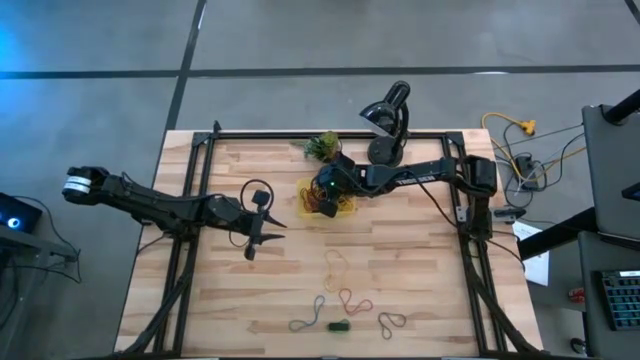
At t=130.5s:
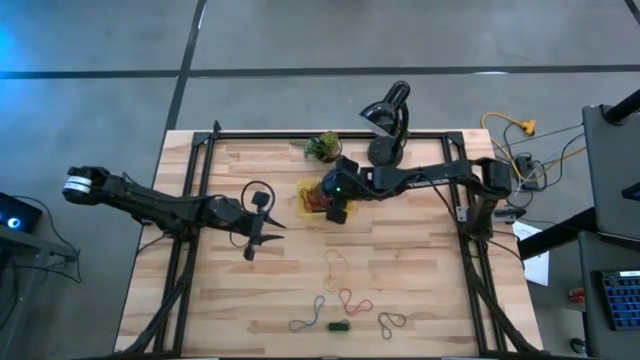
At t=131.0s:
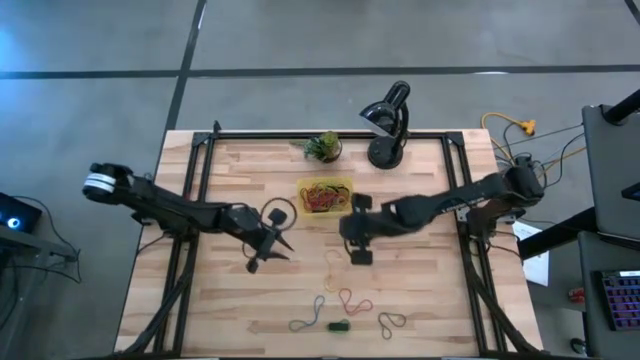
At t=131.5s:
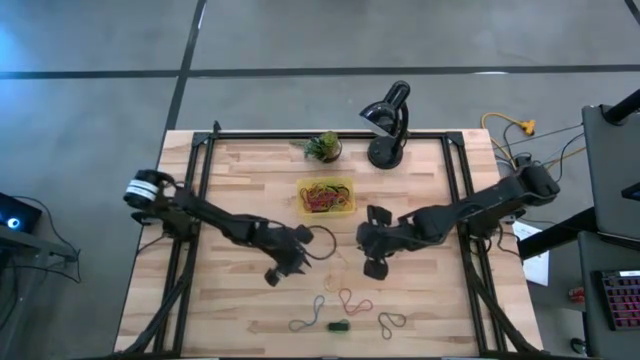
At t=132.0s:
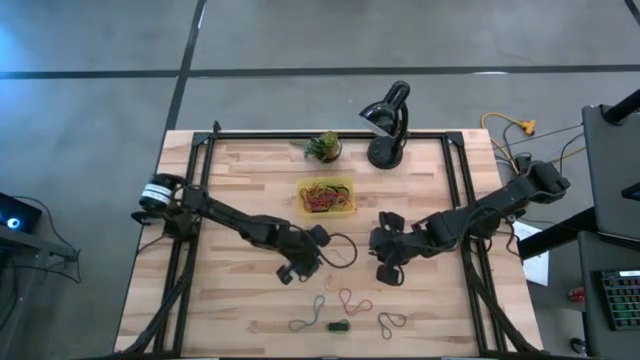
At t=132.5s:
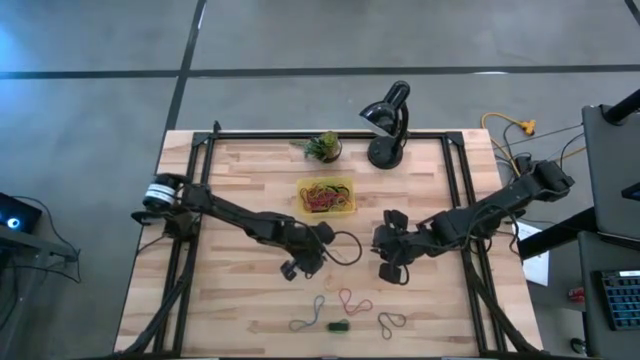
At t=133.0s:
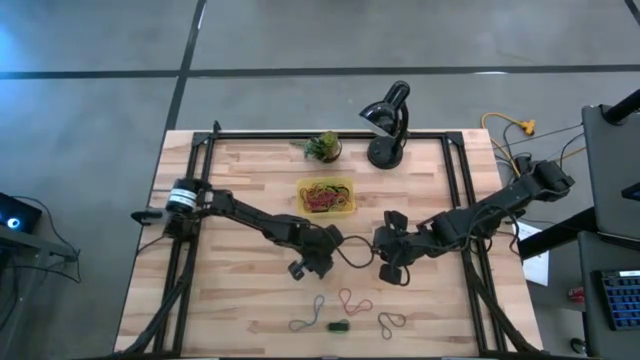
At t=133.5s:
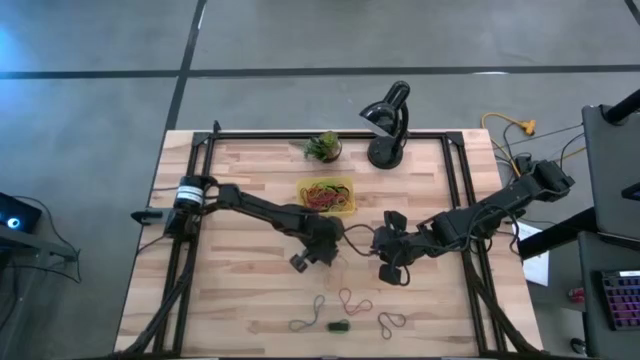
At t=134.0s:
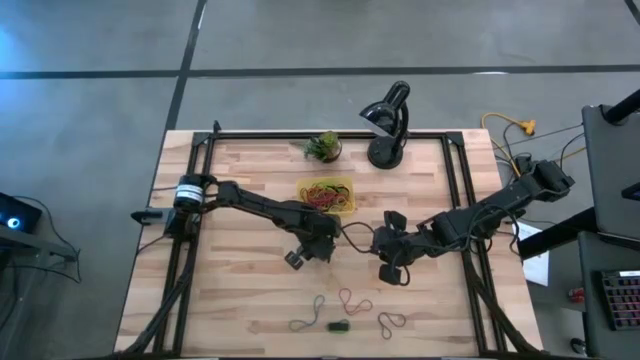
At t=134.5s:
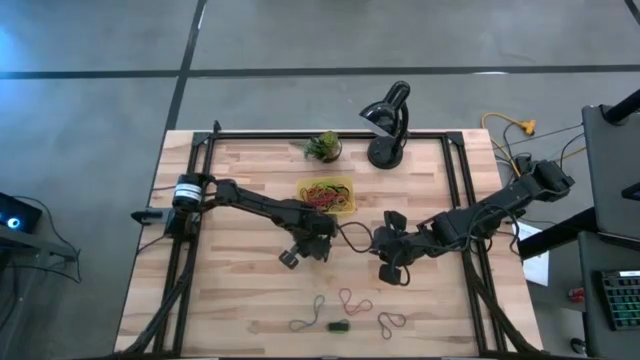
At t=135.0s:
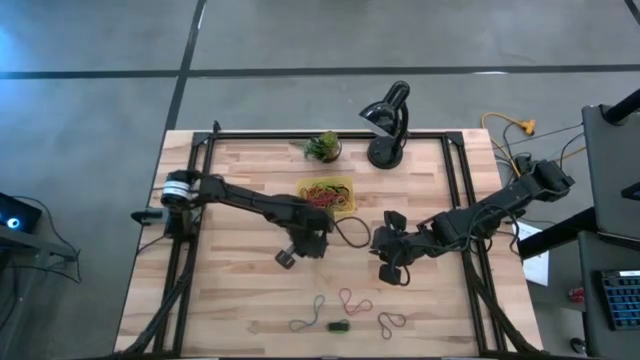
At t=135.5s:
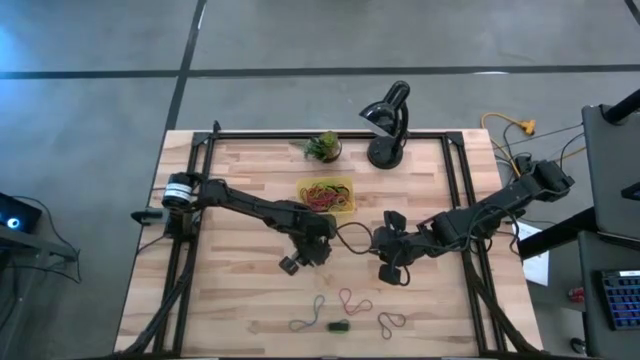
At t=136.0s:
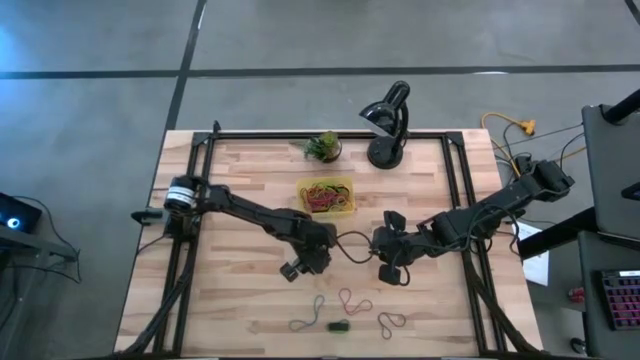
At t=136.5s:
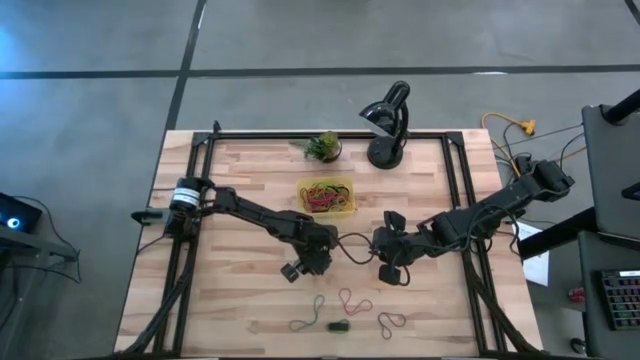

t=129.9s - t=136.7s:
Task: Pick and place rubber bands into bin
Put the yellow rubber band in the yellow bin

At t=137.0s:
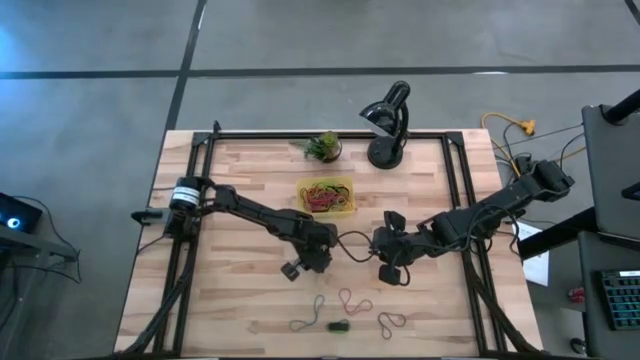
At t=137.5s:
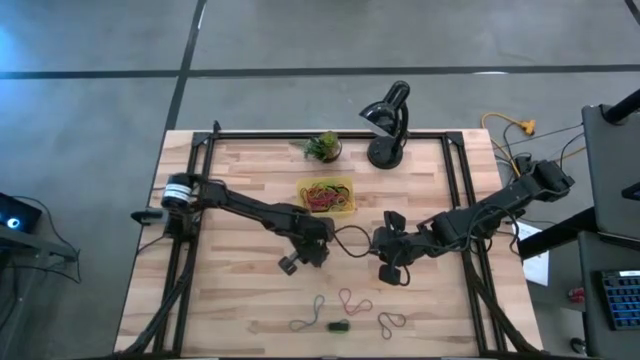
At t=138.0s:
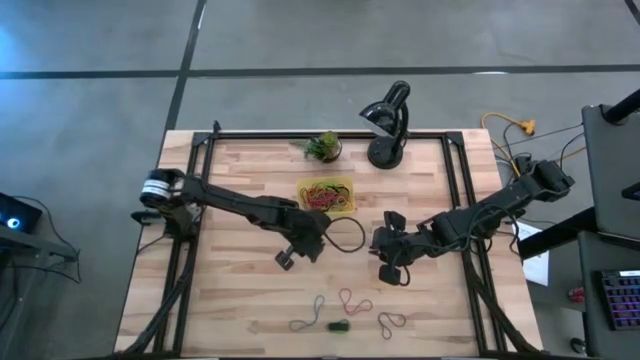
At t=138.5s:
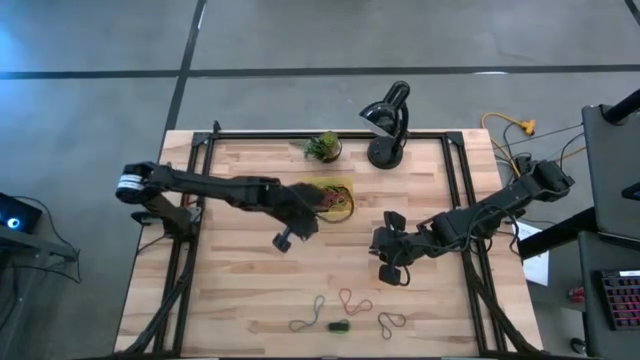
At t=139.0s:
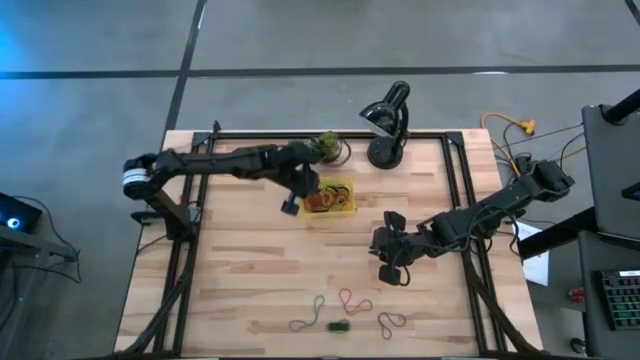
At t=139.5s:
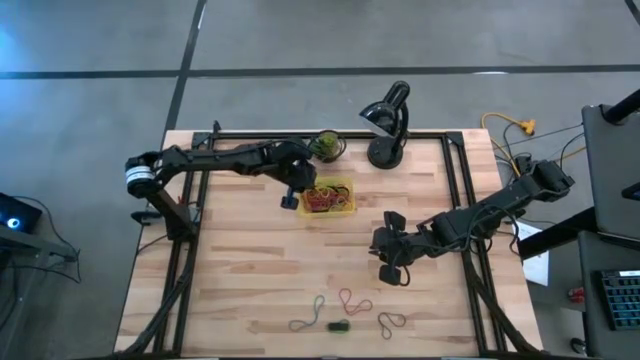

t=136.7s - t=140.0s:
Put the yellow rubber band in the yellow bin

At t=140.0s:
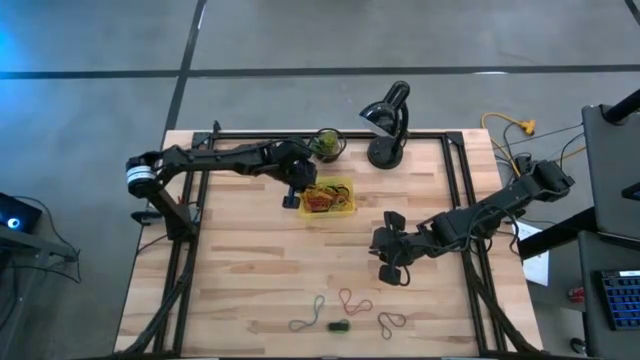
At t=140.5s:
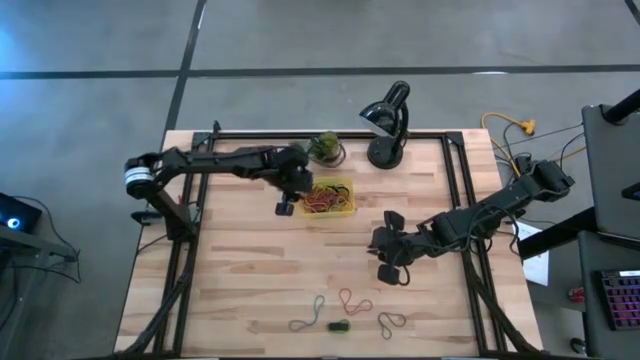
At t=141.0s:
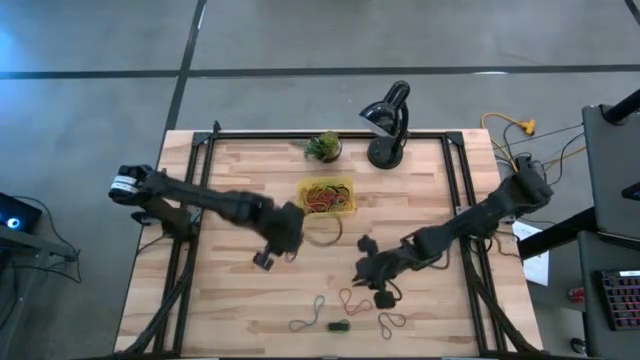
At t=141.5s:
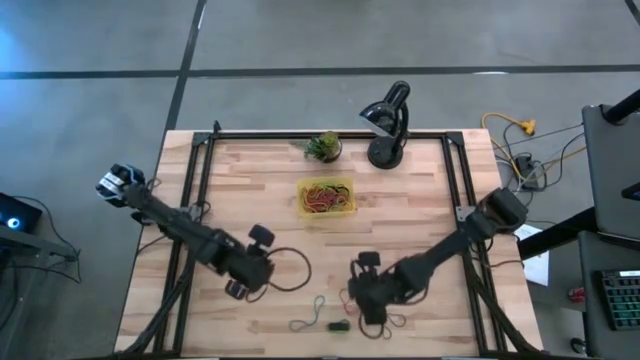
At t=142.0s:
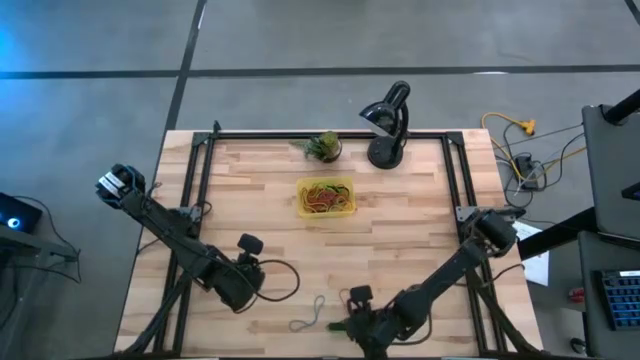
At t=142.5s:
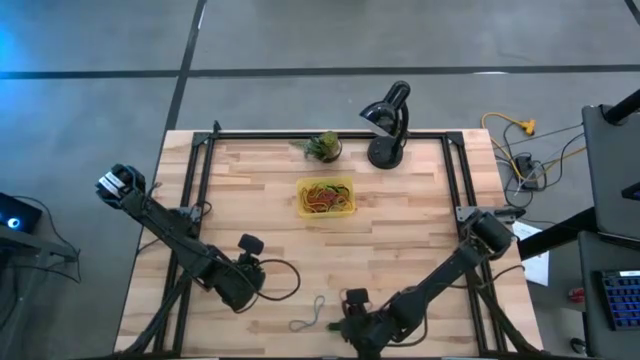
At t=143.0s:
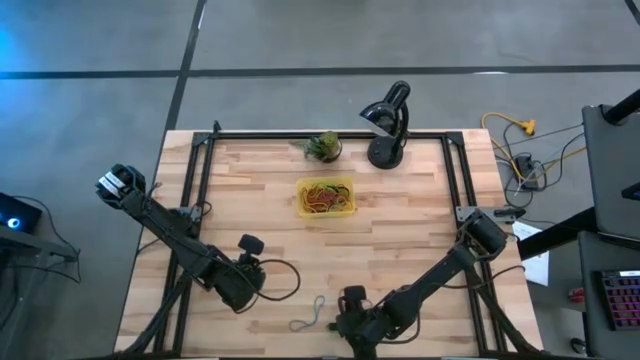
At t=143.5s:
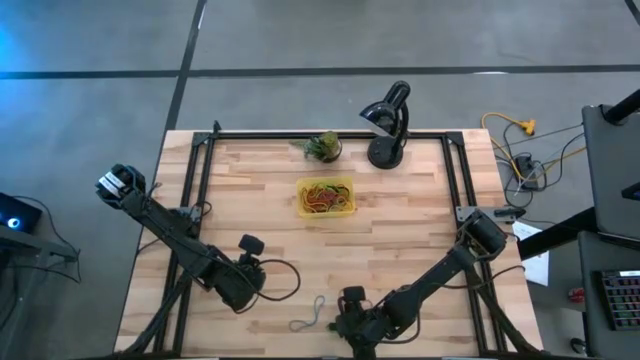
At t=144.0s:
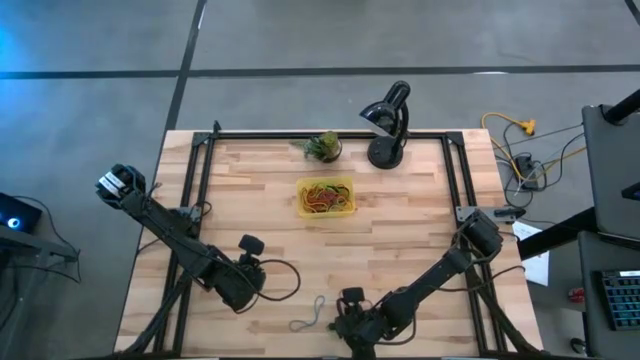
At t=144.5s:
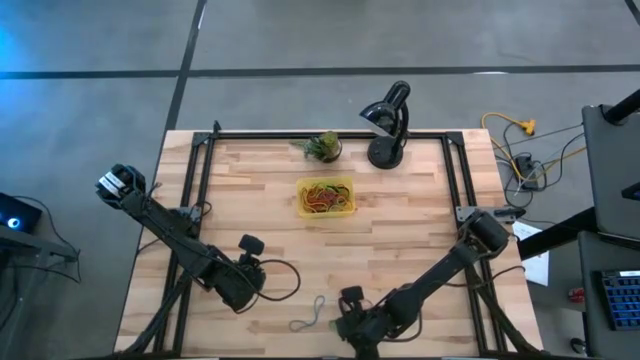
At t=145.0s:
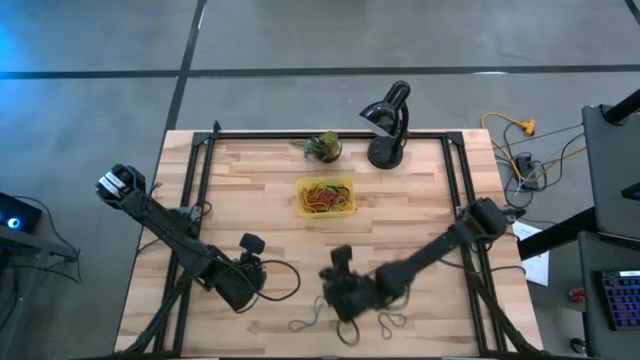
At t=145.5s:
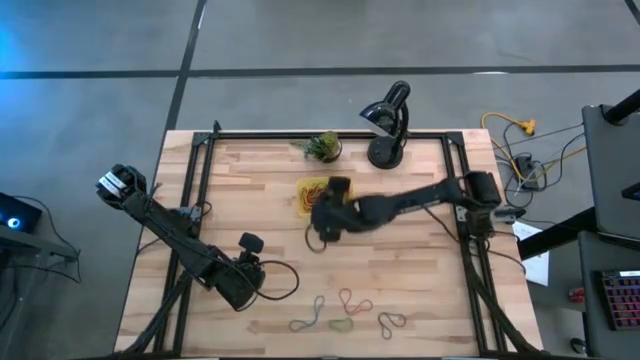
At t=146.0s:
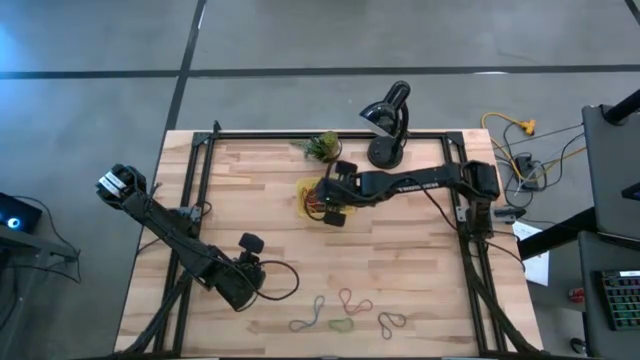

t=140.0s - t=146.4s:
Put the black rubber band in the yellow bin

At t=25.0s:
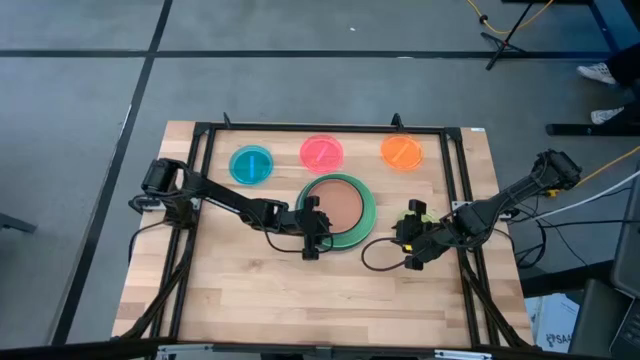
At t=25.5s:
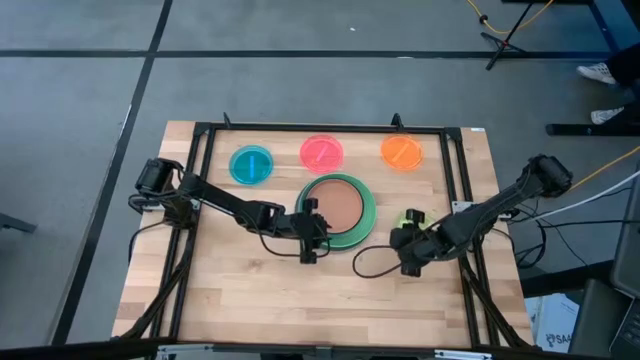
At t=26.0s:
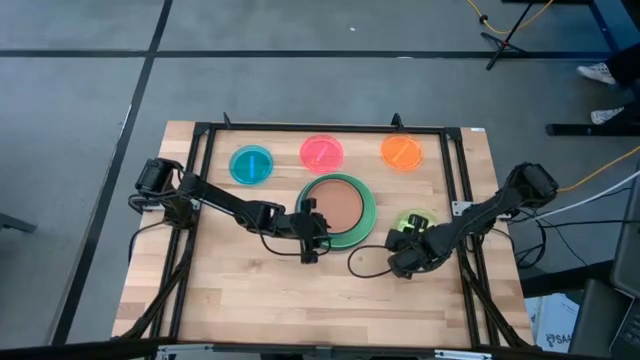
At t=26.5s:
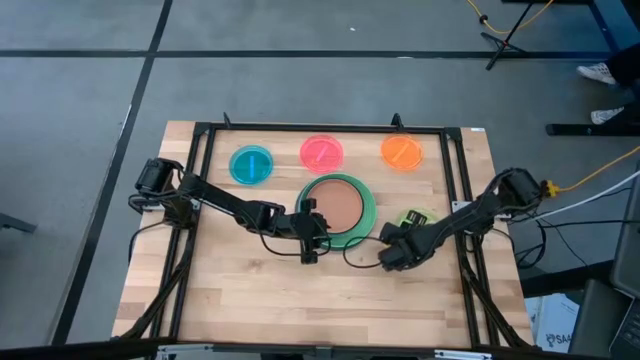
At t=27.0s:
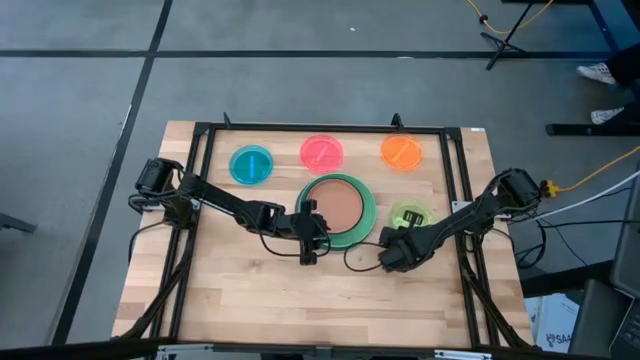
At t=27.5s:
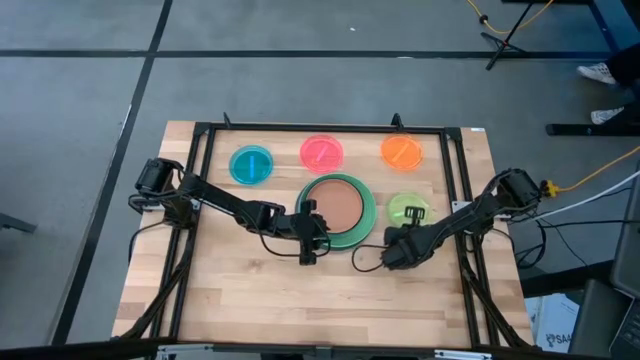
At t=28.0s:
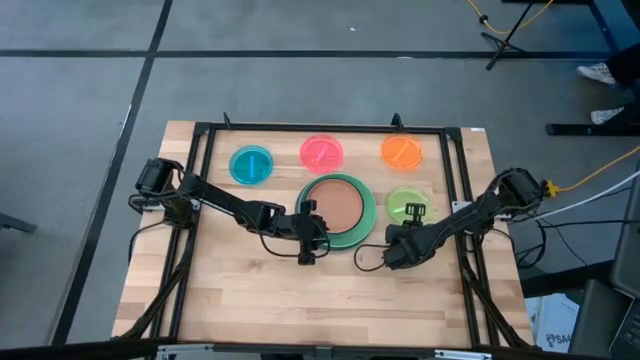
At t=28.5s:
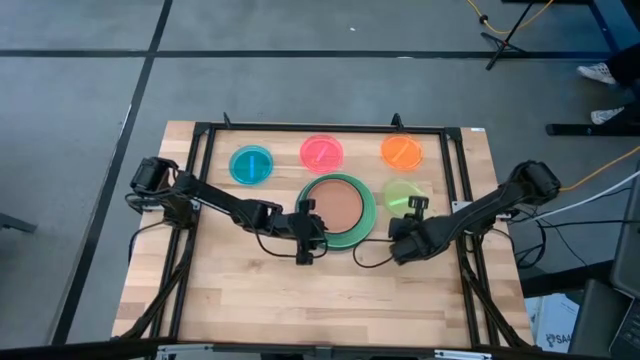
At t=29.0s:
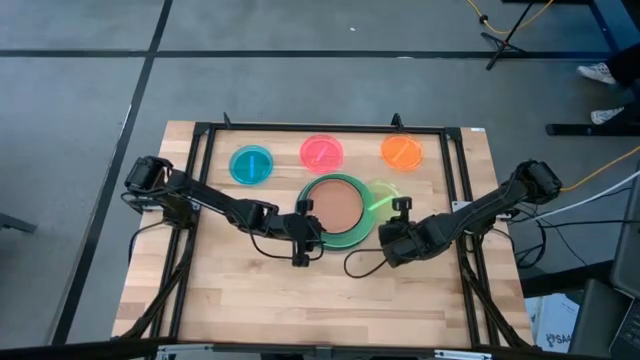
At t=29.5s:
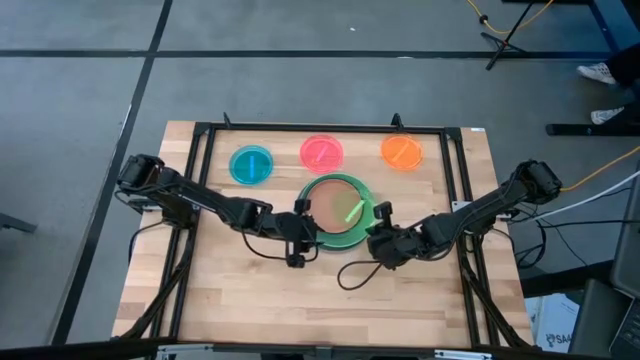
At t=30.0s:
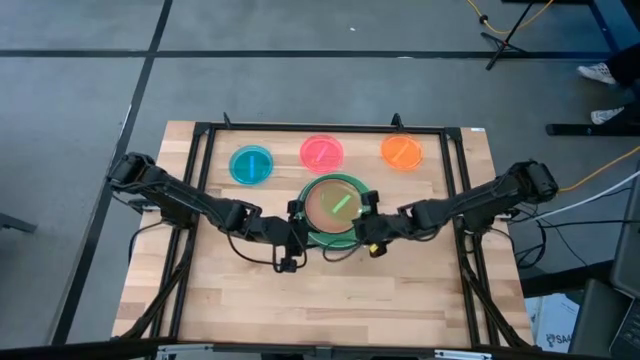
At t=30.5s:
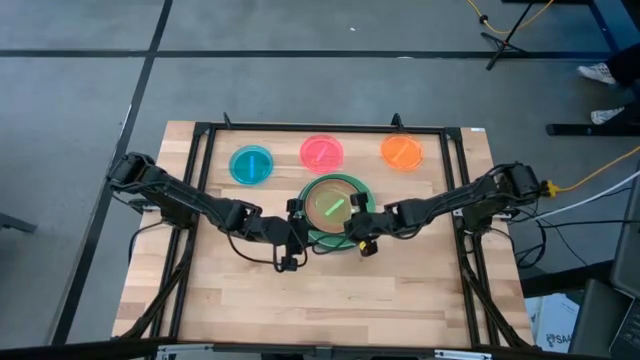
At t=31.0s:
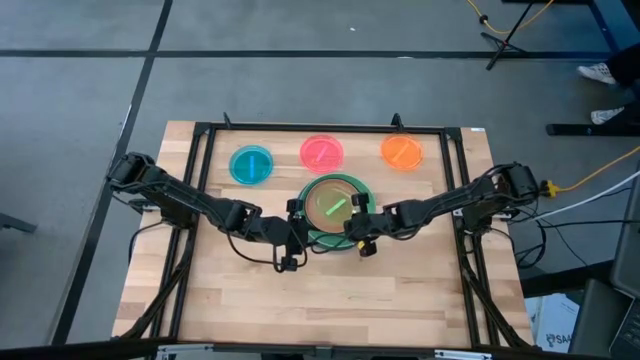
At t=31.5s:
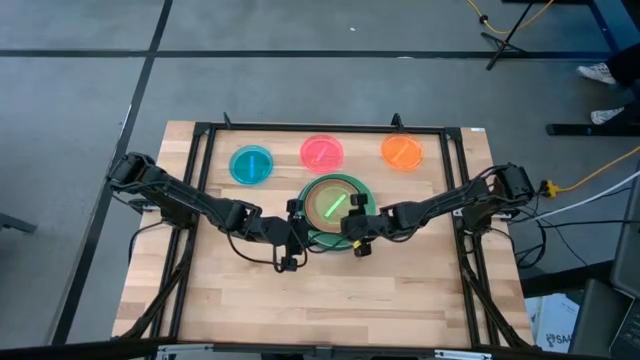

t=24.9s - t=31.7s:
Task: Stack plastic plates
Stack the green plate on top of the brown plate
